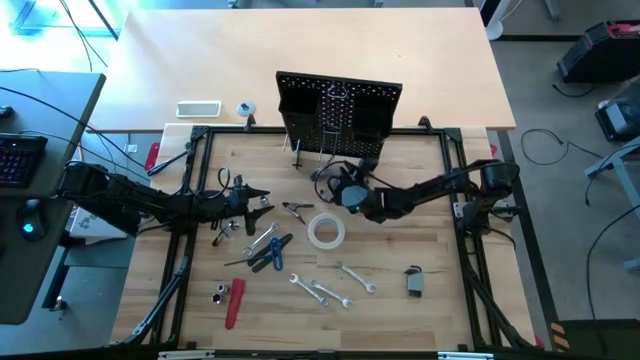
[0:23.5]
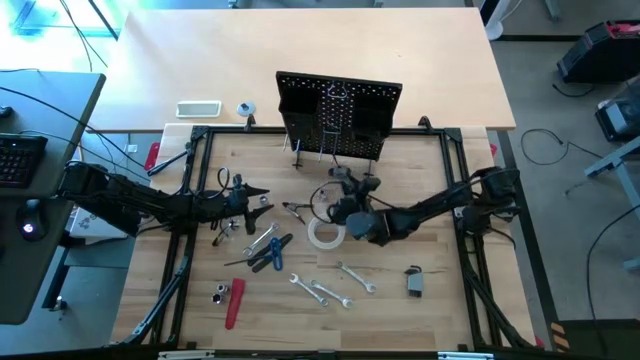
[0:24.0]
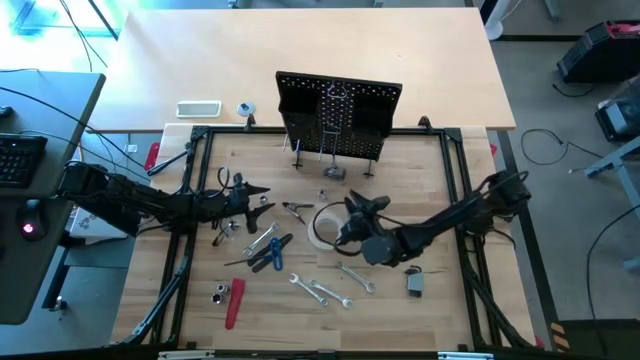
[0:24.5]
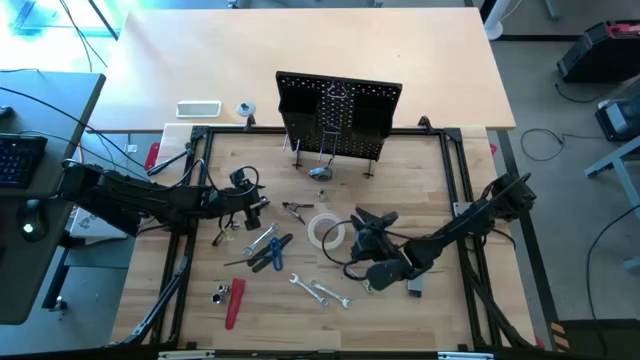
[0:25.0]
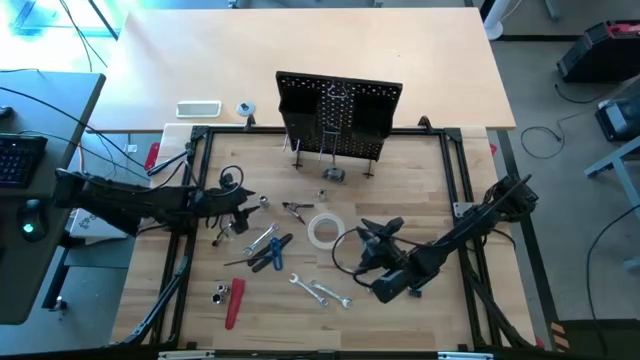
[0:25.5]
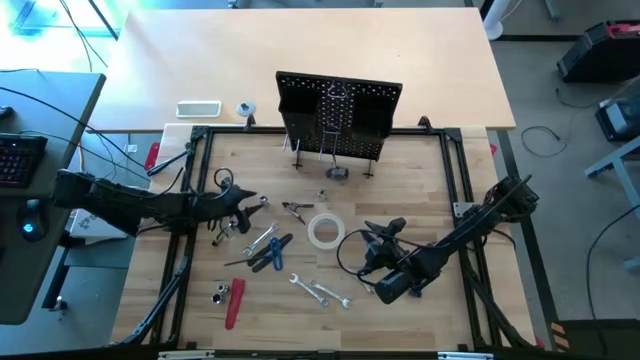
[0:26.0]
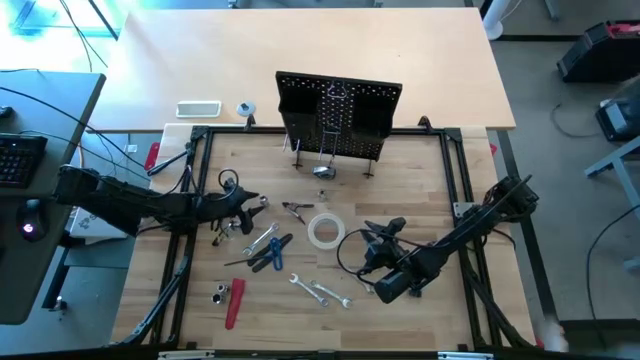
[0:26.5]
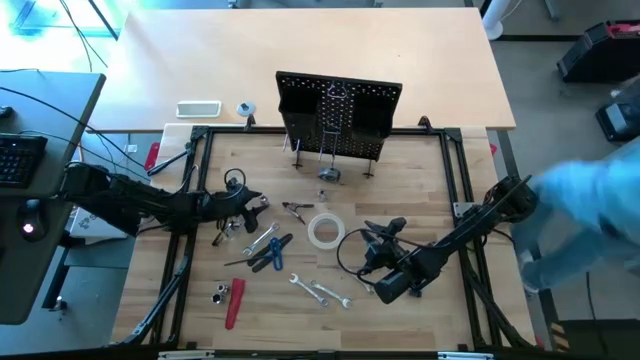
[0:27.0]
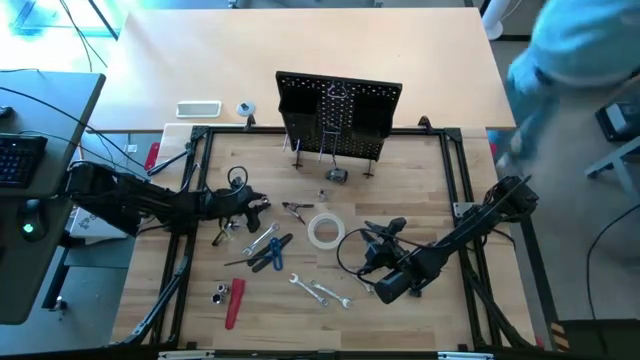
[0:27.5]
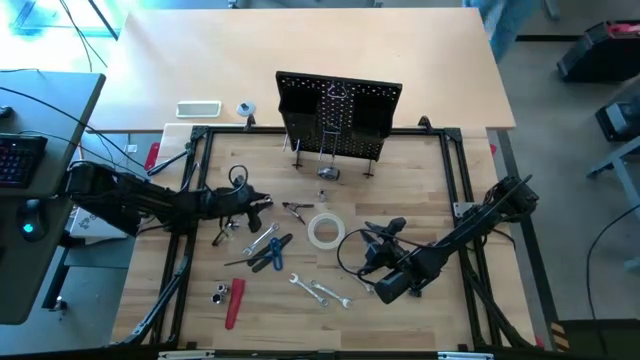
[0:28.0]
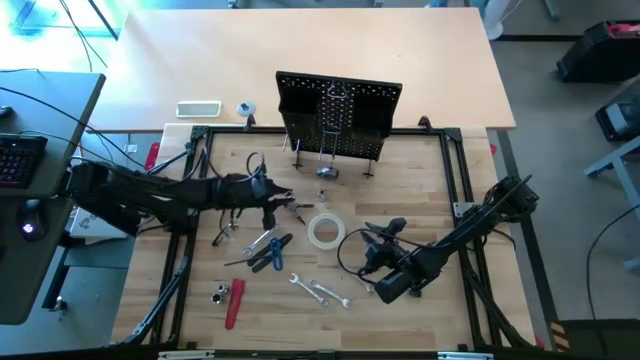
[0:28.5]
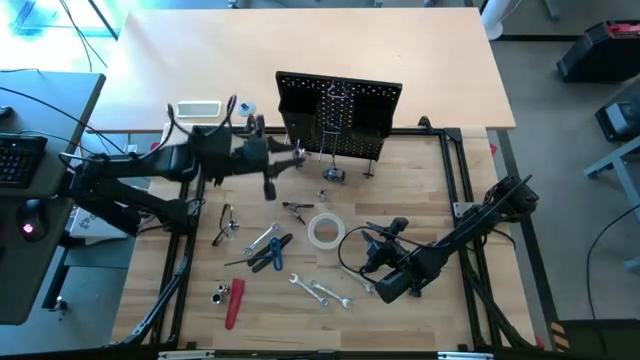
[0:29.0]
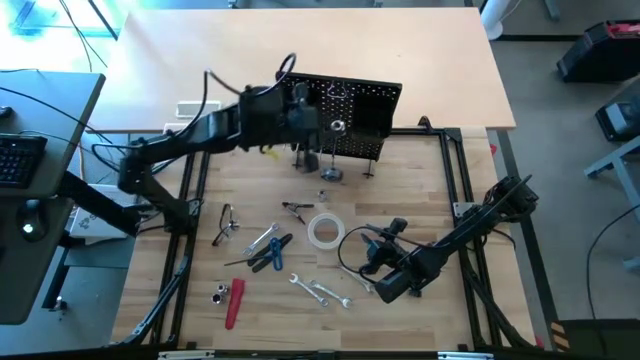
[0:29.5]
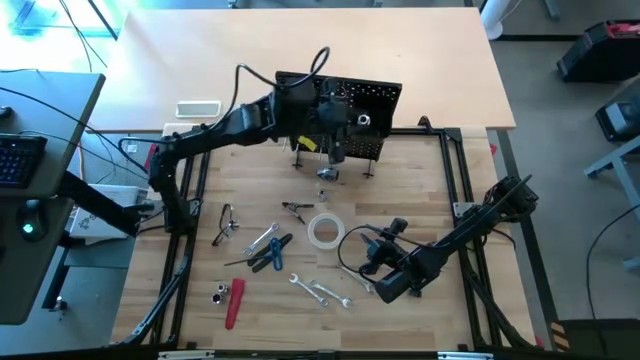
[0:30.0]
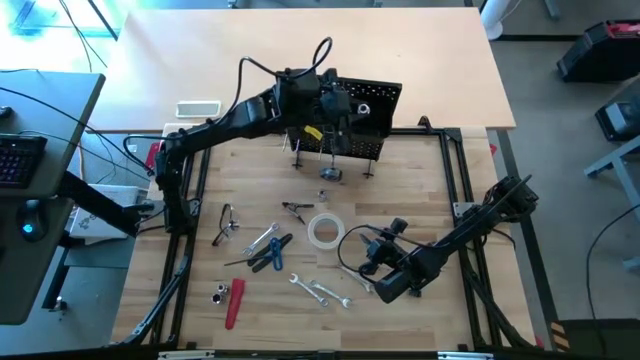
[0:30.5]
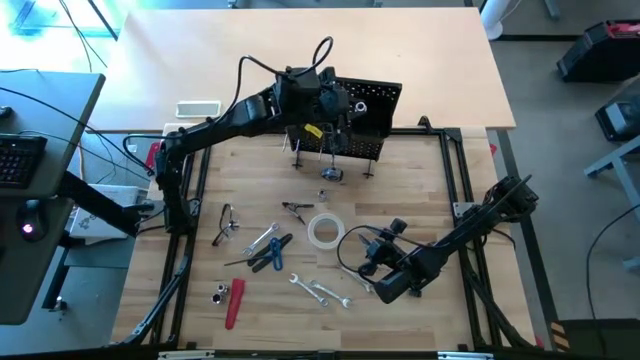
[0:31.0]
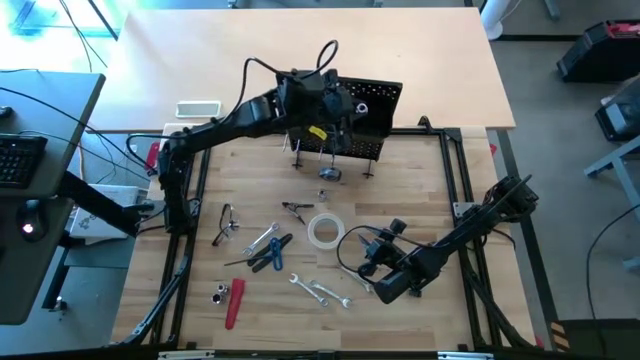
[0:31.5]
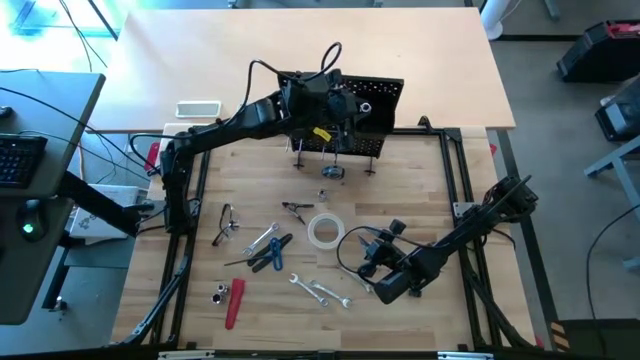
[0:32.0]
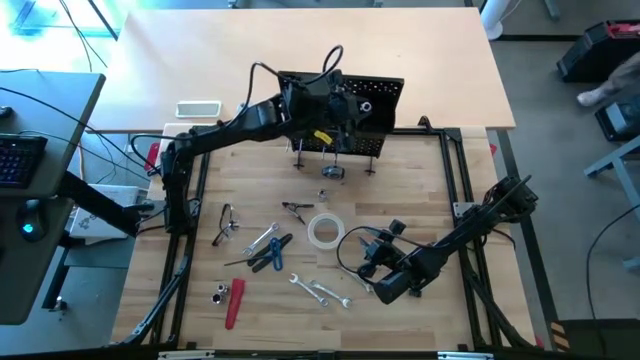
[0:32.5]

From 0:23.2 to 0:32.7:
Task: Hang tools onto peg board
Put the silver socket into the right black bin on the peg board

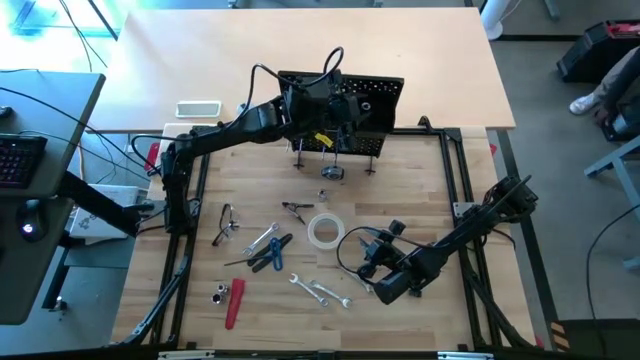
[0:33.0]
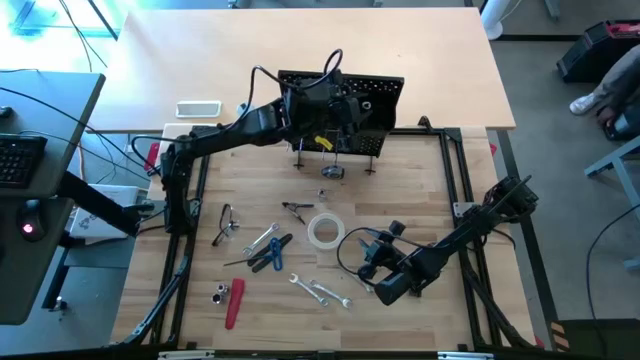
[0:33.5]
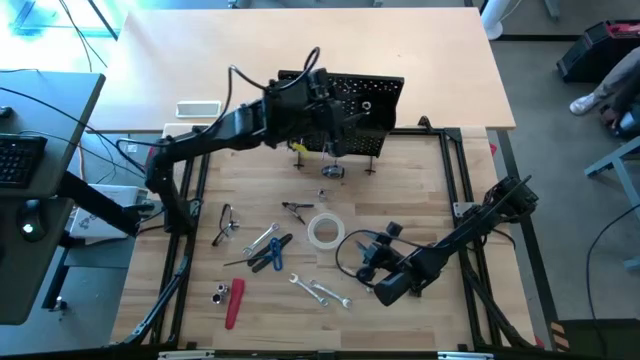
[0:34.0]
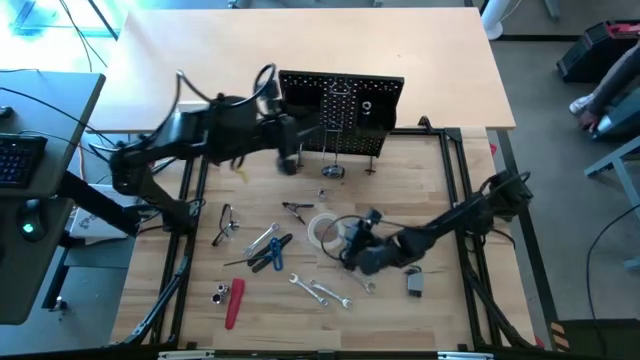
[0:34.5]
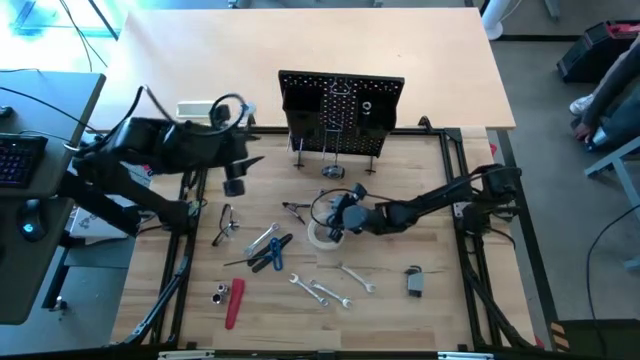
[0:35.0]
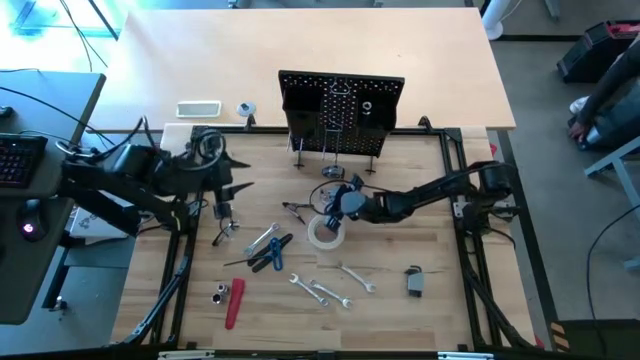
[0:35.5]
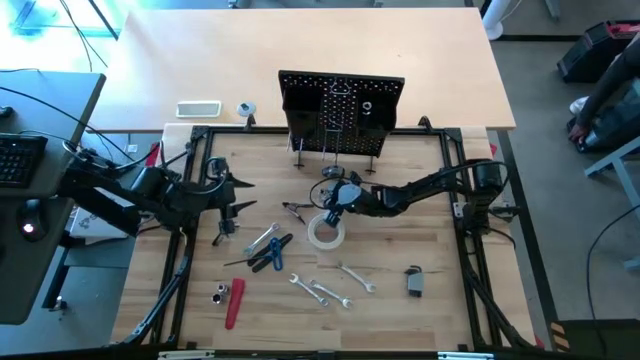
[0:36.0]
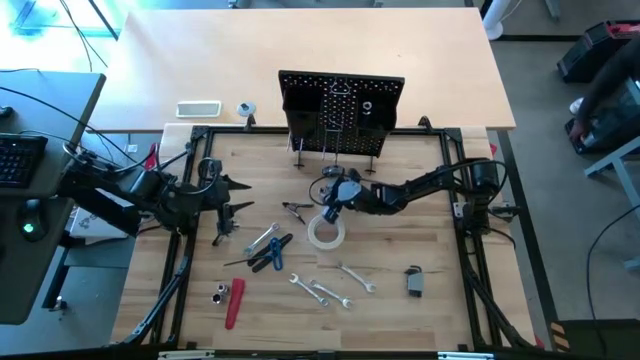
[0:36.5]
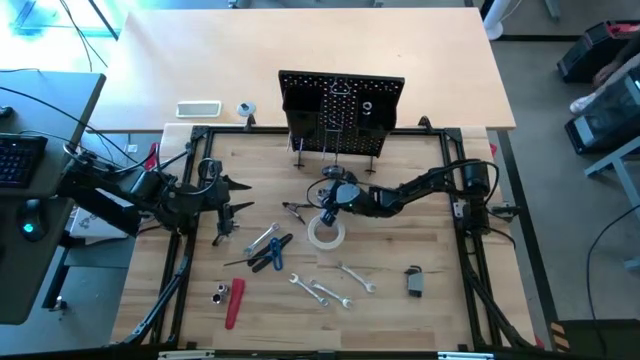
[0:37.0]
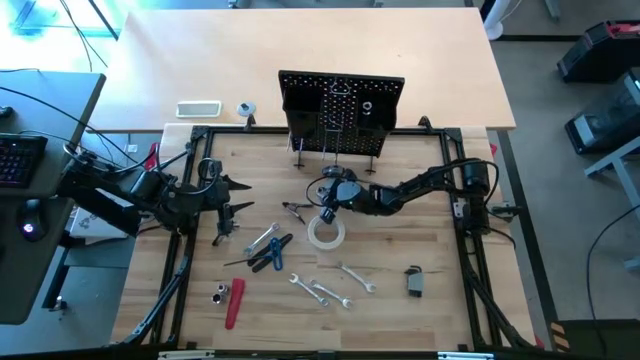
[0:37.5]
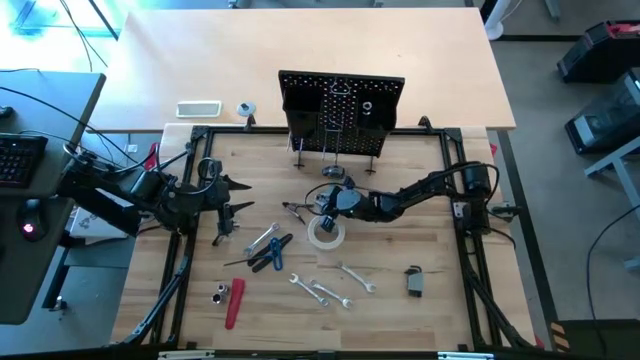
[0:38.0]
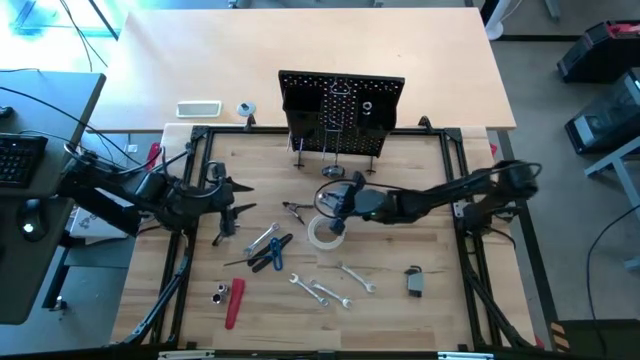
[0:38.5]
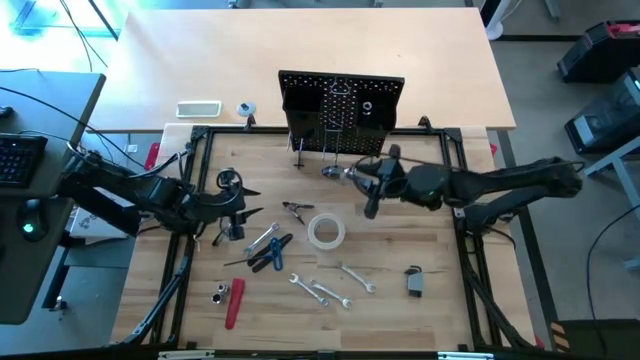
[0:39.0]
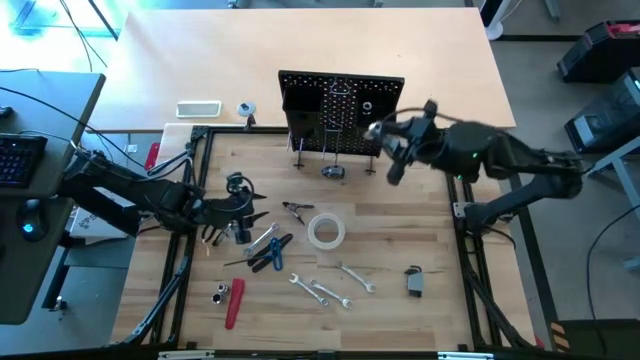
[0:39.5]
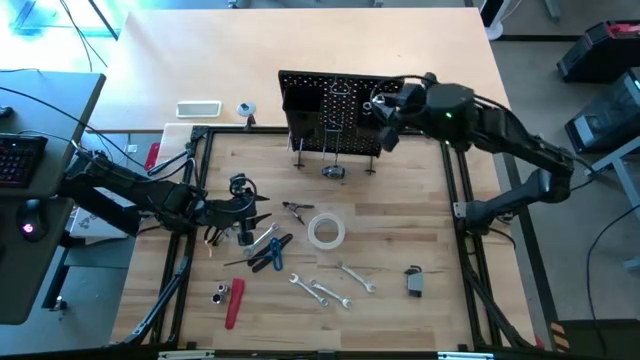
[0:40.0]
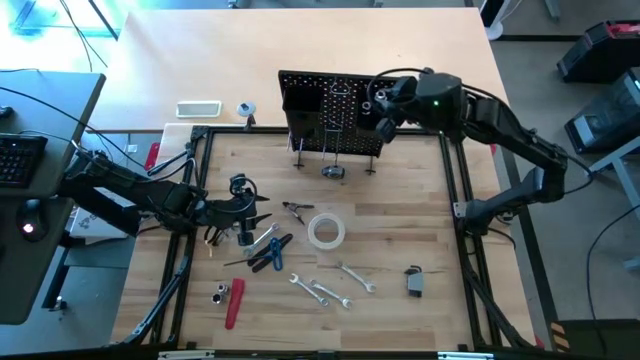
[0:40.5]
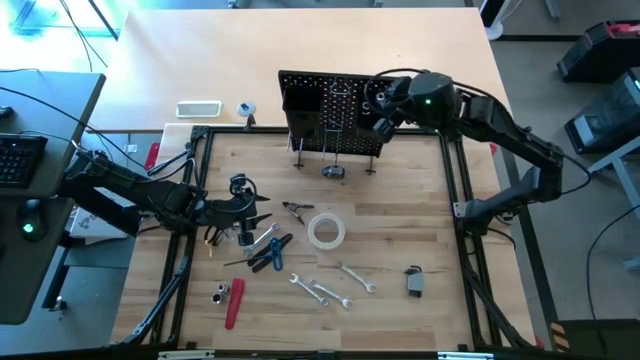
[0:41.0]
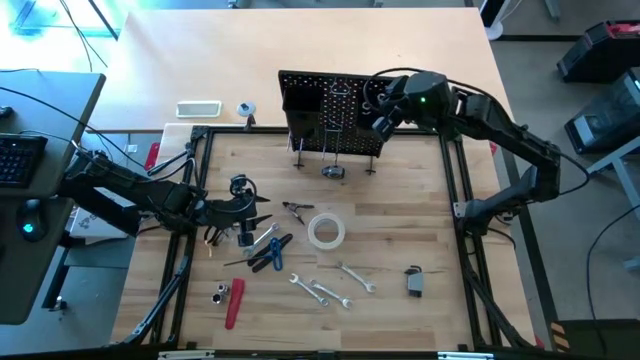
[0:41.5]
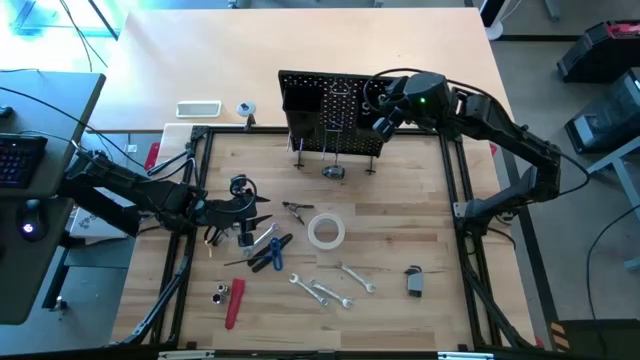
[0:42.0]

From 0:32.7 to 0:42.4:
Put the silver socket into the right black bin on the peg board

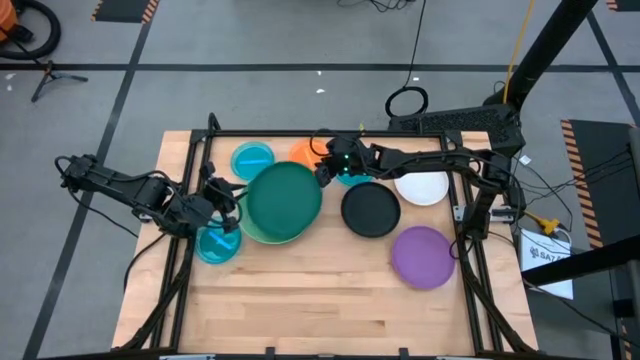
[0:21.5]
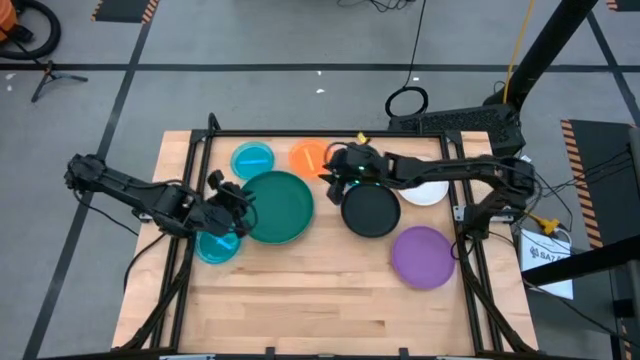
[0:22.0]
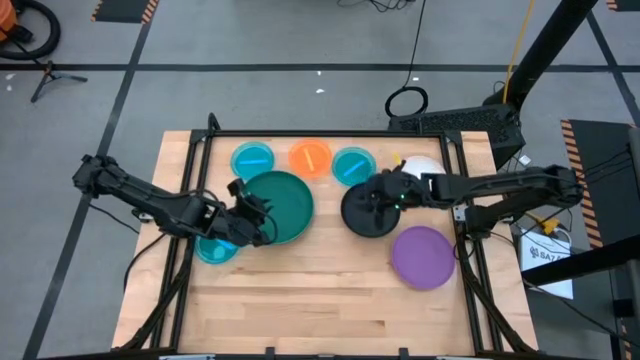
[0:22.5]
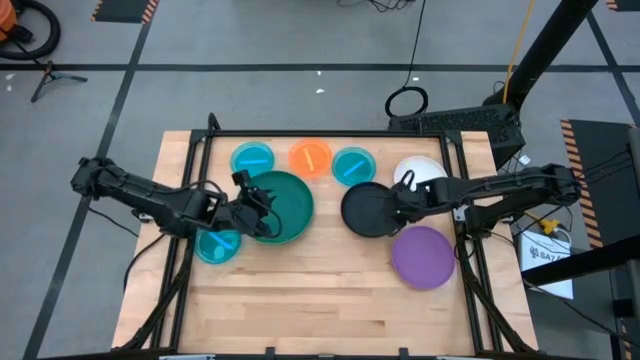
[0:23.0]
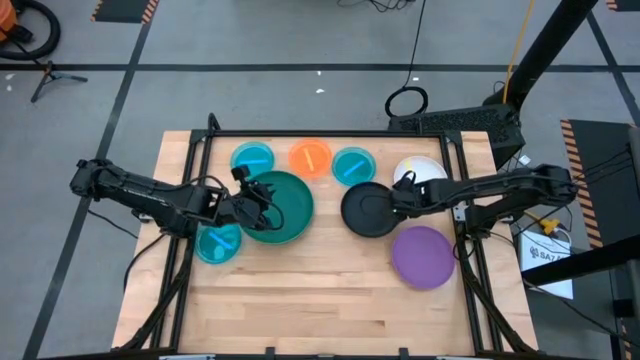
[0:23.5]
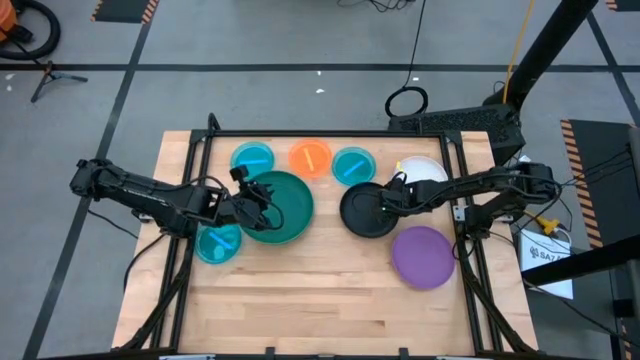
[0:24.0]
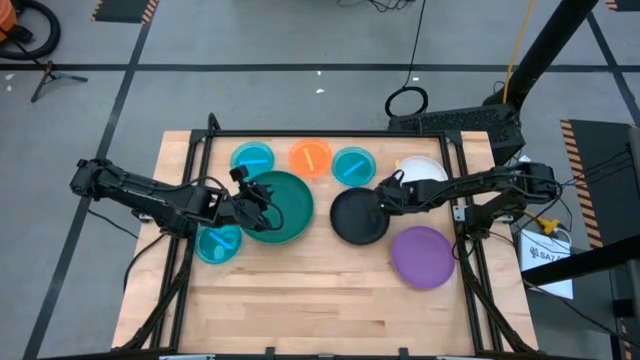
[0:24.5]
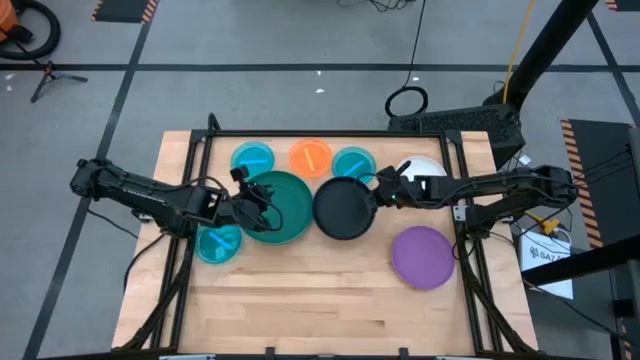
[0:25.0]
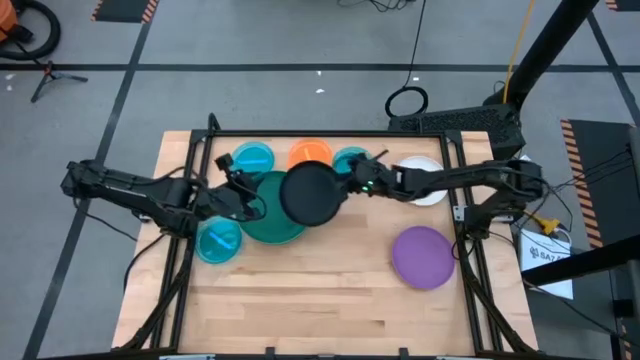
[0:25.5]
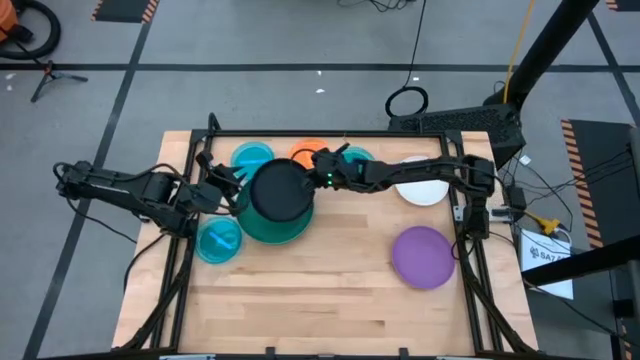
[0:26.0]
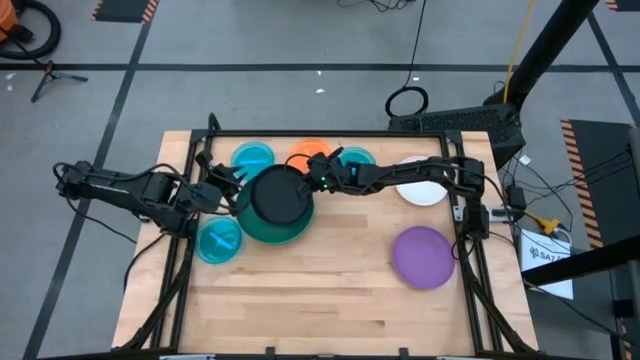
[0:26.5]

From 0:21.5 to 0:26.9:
Task: Stack plastic plates
Stack the black plate on top of the dark green plate
